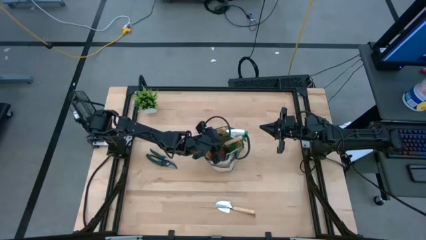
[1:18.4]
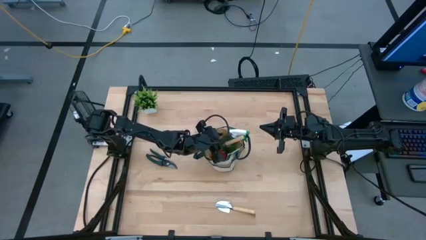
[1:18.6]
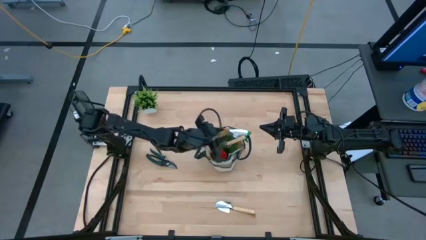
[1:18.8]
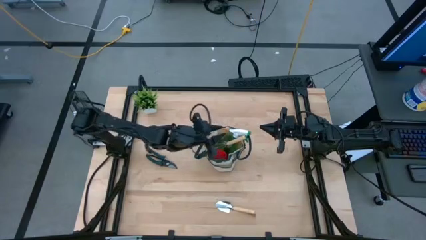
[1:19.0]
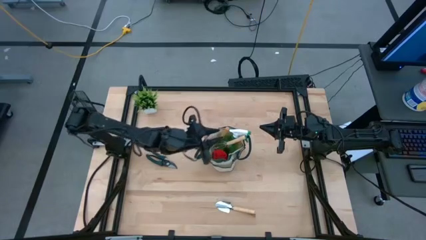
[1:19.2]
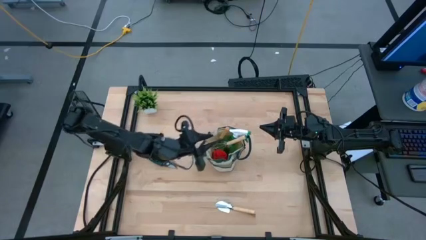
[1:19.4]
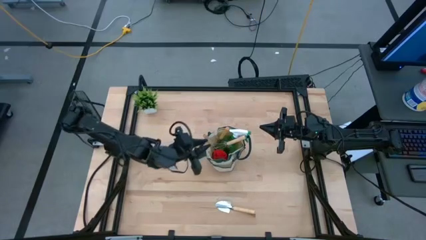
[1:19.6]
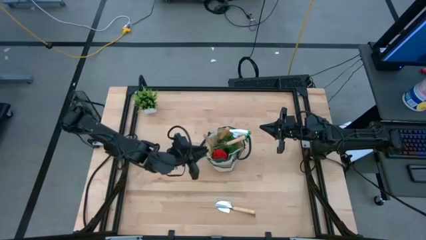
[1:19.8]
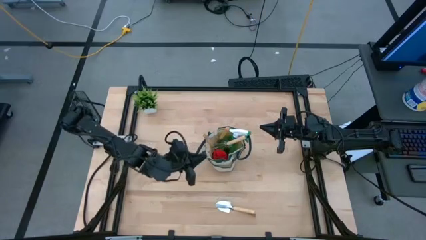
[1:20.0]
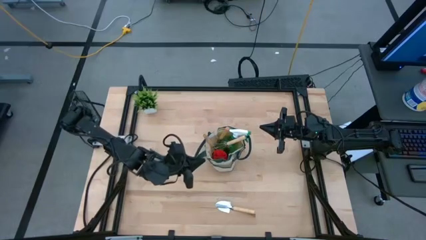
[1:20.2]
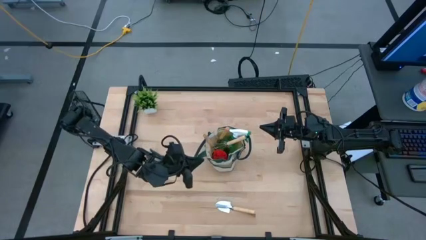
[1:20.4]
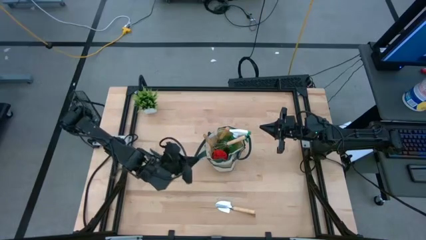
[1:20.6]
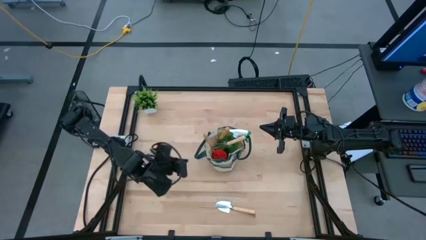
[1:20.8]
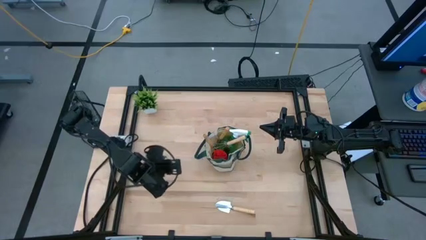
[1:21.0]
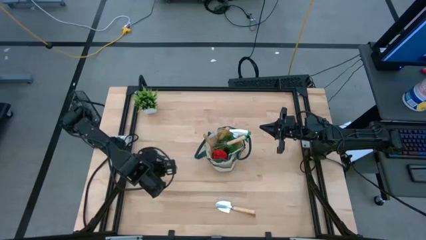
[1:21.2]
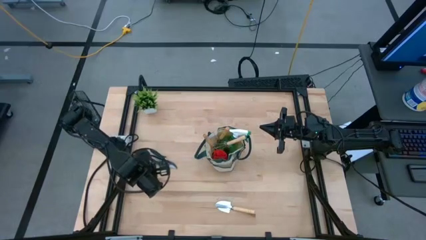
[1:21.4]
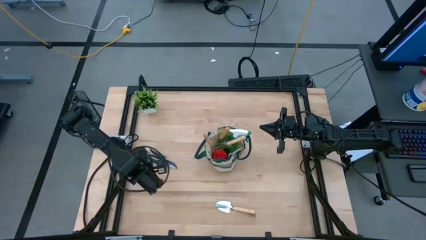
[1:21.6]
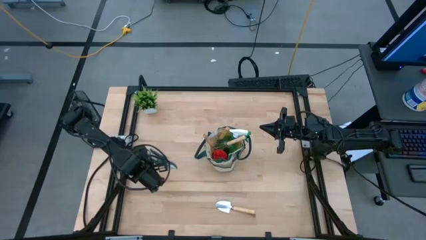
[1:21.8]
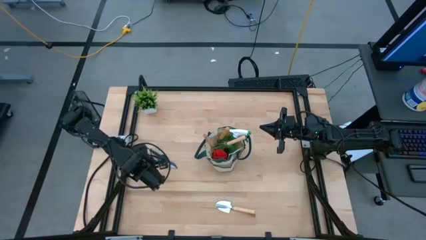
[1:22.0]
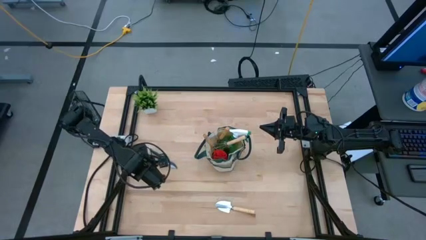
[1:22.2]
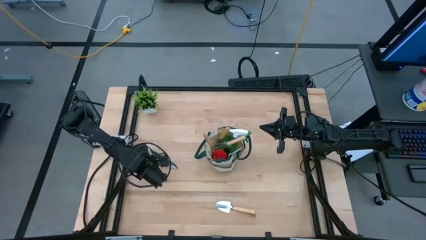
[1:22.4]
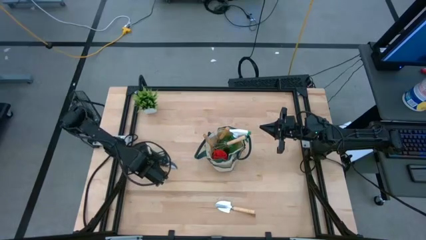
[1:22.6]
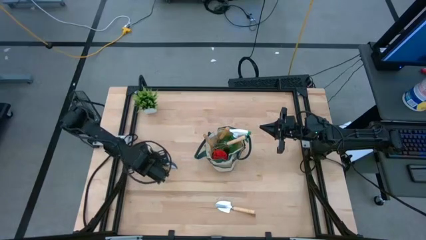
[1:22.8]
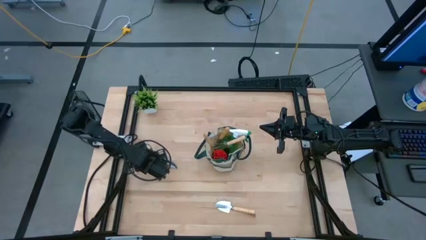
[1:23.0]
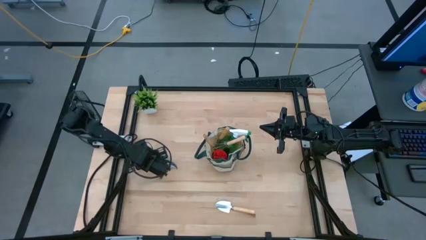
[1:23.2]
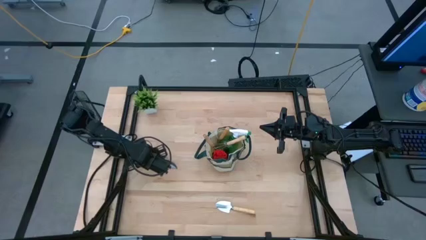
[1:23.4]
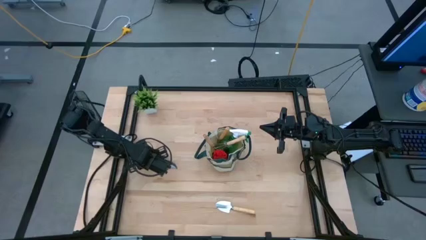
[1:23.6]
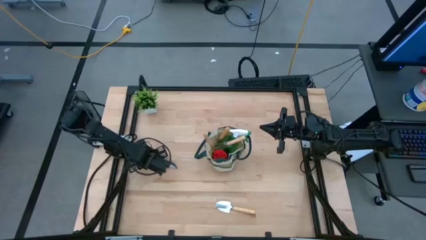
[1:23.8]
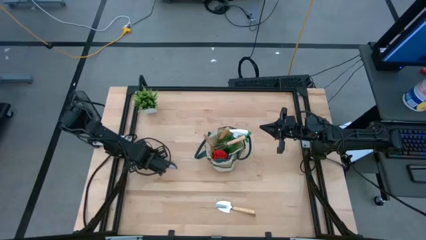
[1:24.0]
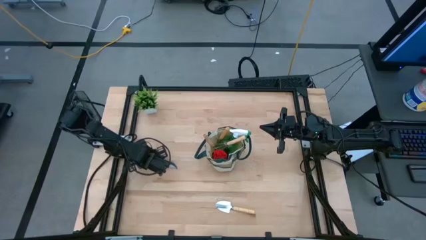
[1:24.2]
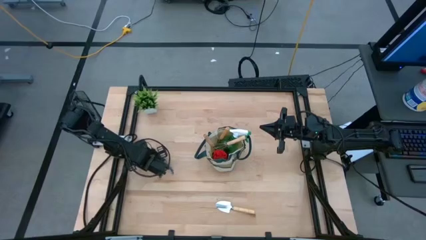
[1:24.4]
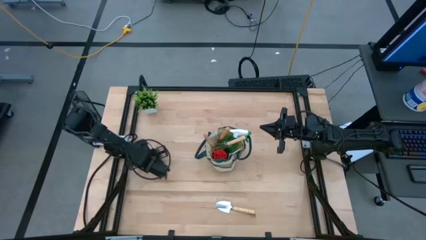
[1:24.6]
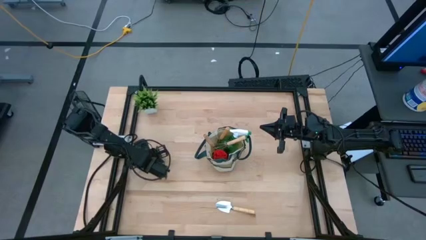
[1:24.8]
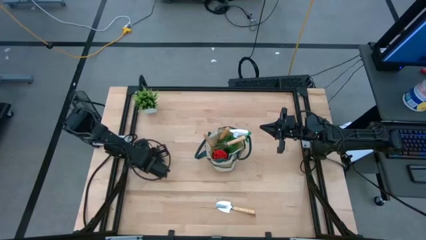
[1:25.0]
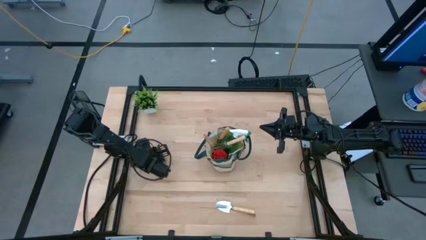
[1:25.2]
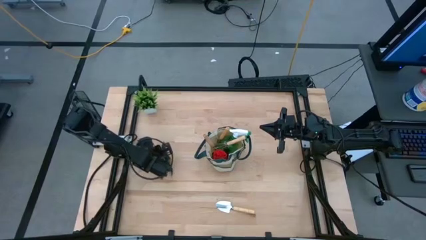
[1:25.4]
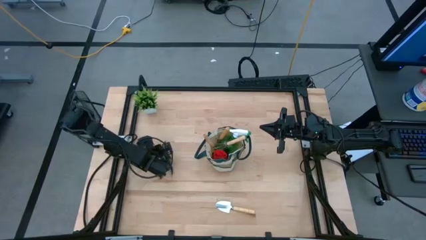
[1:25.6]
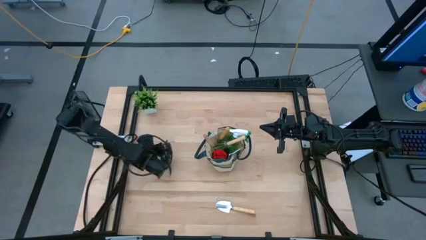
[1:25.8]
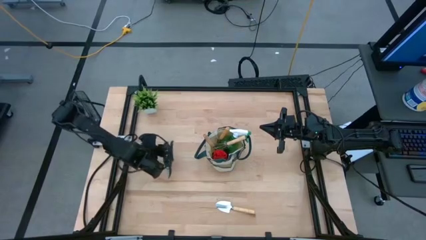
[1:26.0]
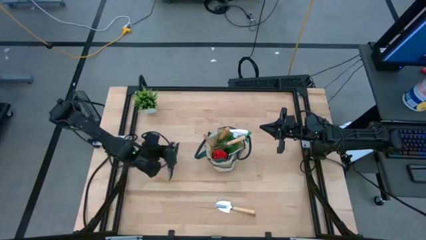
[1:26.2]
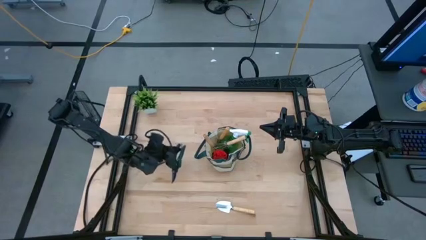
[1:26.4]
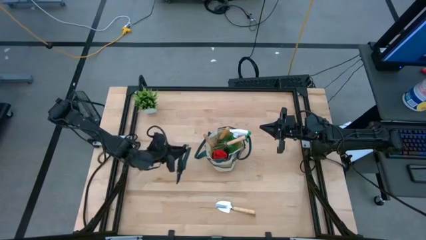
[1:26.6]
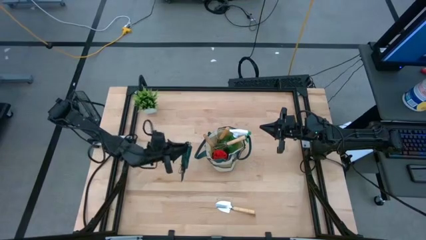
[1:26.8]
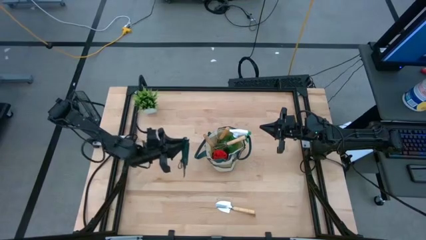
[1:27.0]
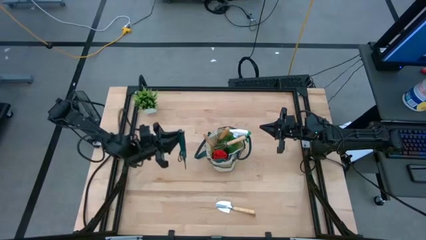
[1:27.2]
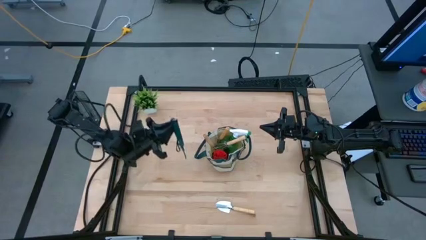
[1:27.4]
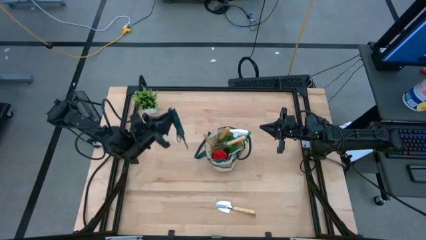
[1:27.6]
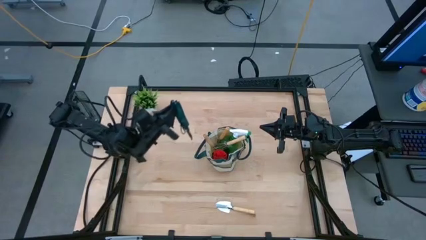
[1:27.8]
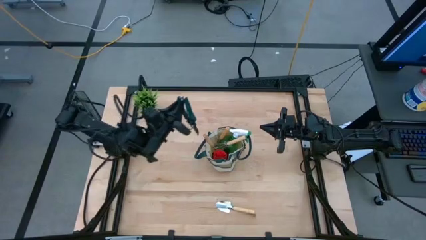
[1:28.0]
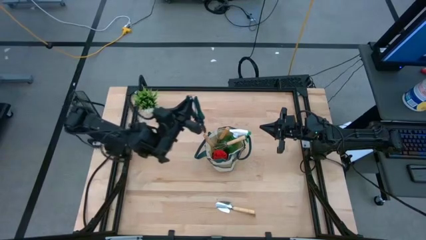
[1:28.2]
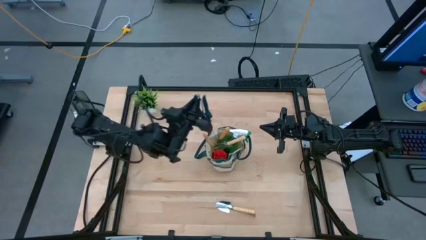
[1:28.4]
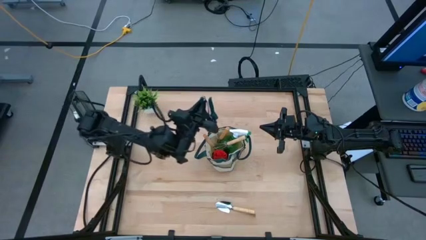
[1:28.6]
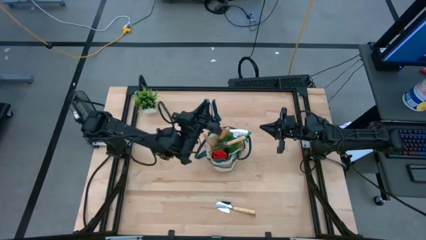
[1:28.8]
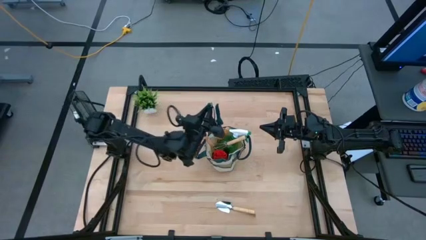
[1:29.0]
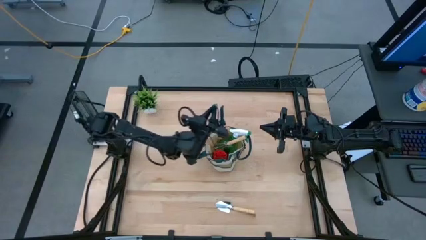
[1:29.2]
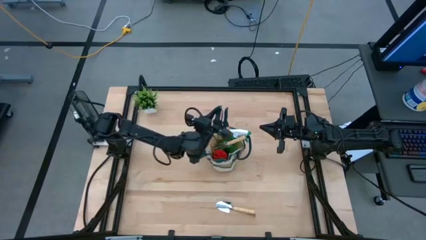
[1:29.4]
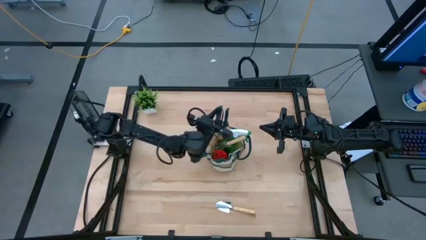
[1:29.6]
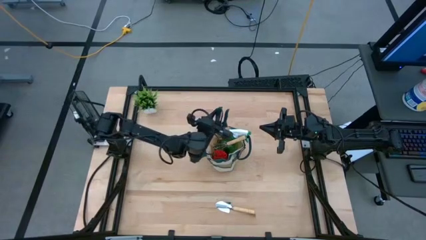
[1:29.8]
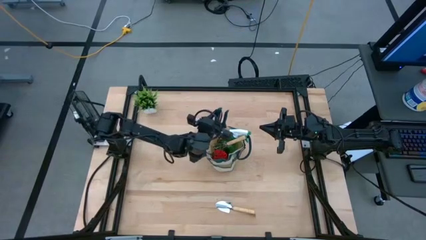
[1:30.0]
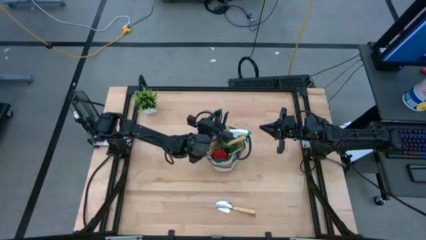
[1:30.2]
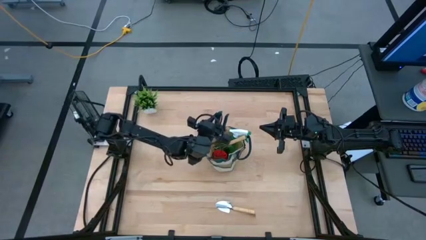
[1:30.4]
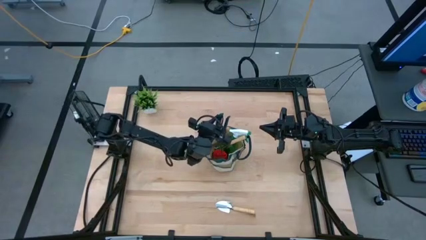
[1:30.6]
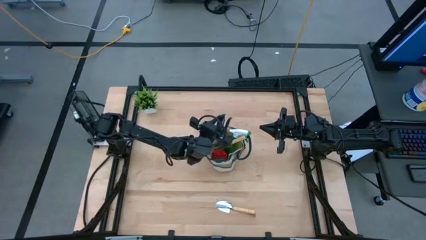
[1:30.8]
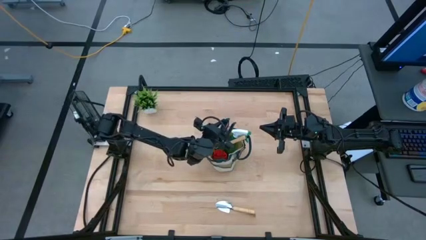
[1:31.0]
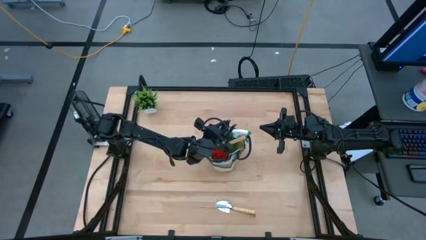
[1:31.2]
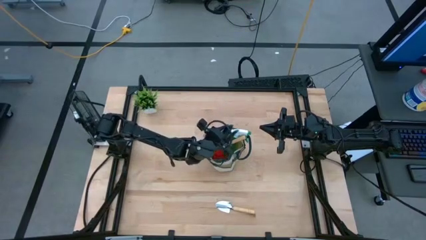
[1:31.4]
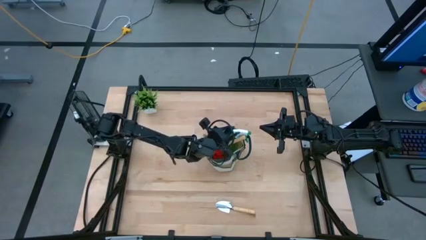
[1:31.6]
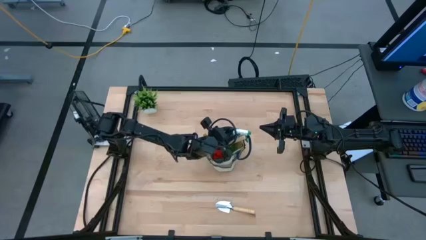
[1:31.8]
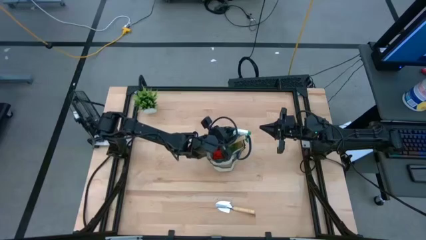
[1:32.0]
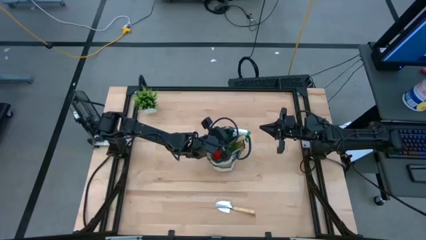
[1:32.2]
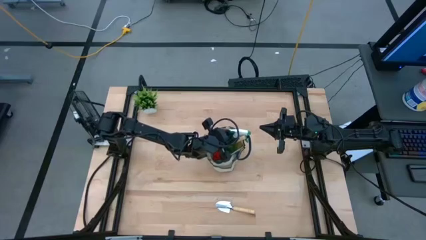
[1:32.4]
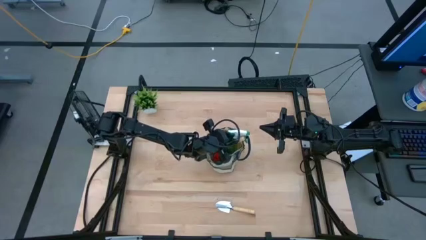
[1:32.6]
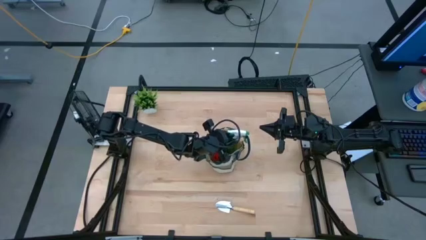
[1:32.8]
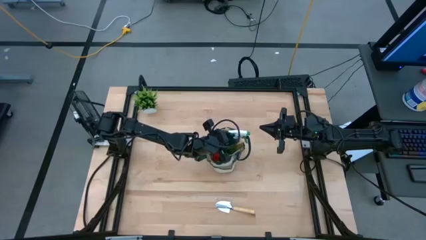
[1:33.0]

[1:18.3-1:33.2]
Task: Pick & Place Garden tools in Gardening bag
Put the green shear scissors into the light brown gardening bag
